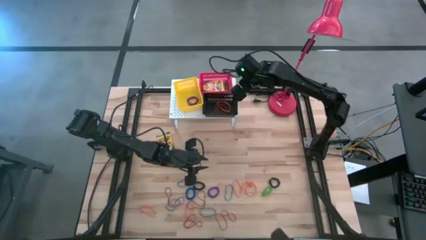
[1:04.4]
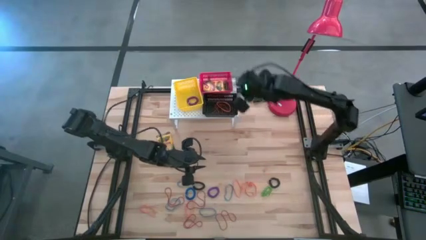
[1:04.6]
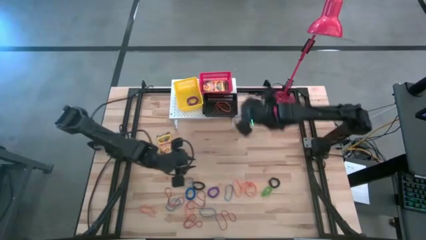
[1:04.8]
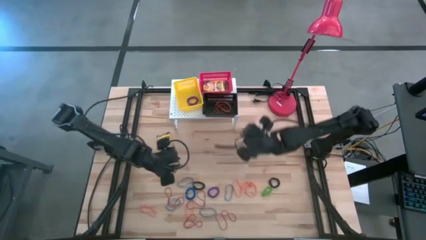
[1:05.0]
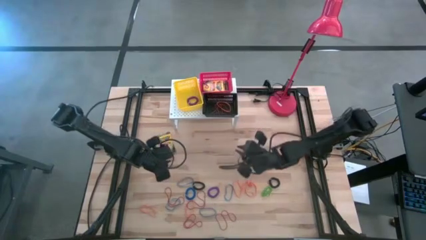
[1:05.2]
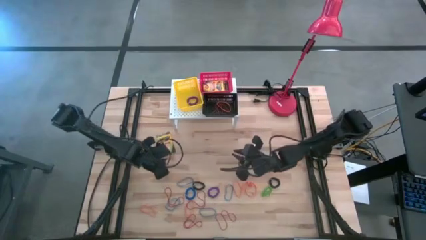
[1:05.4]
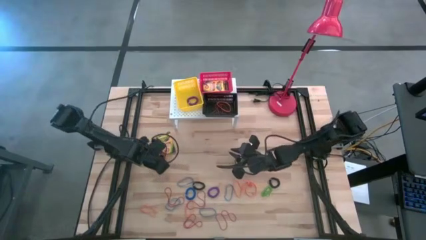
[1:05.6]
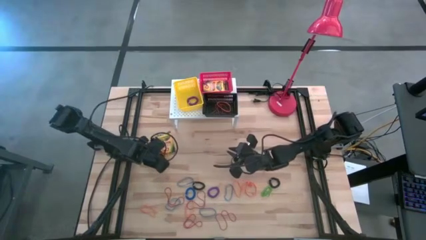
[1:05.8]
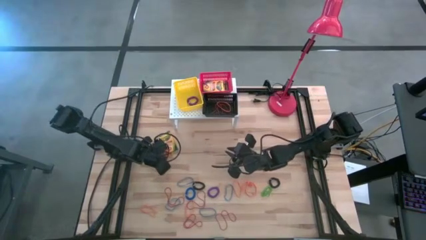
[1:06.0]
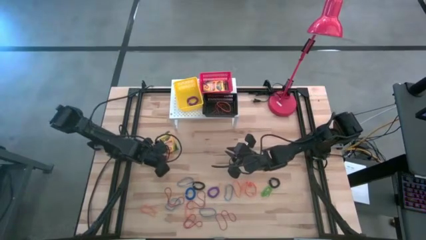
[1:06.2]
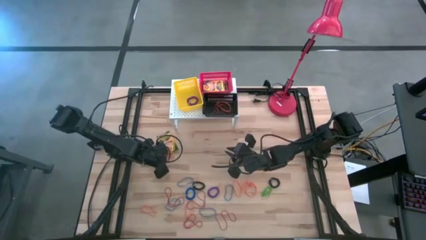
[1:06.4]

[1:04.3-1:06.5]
Task: Pick & Place Office Desk Supplies
Put the orange rubber band into the black bin on the shelf

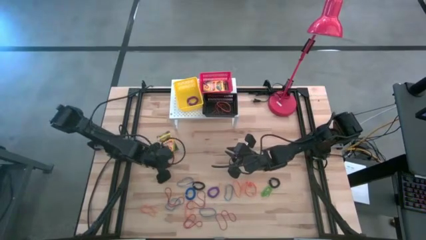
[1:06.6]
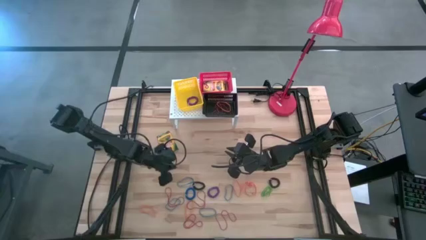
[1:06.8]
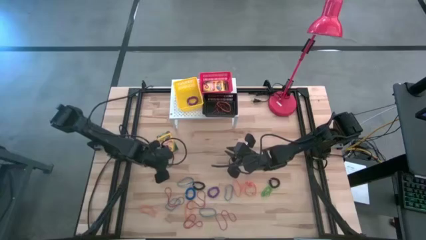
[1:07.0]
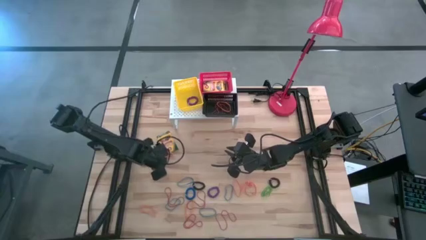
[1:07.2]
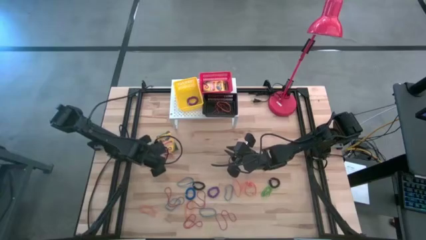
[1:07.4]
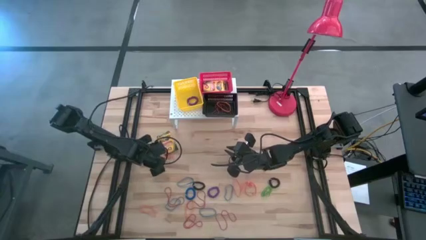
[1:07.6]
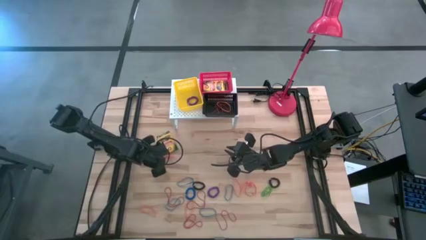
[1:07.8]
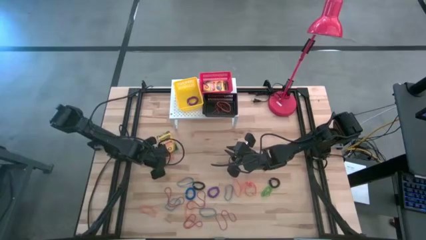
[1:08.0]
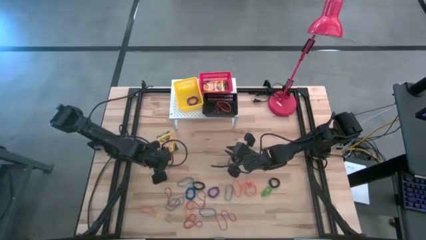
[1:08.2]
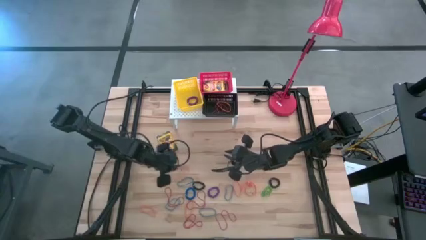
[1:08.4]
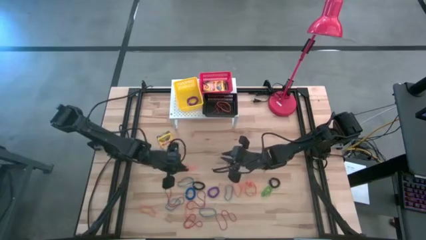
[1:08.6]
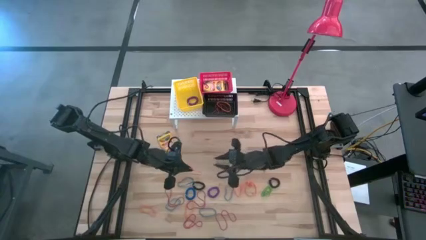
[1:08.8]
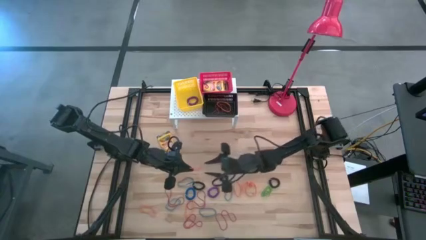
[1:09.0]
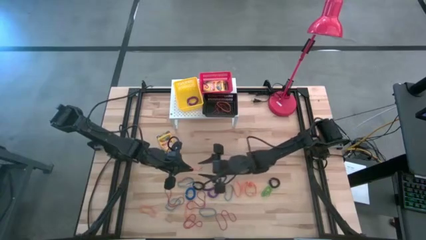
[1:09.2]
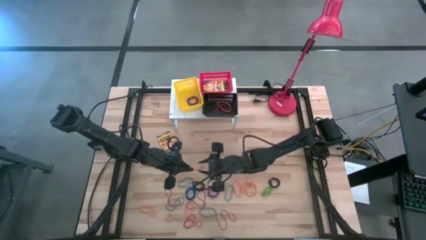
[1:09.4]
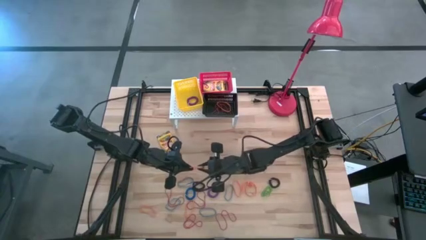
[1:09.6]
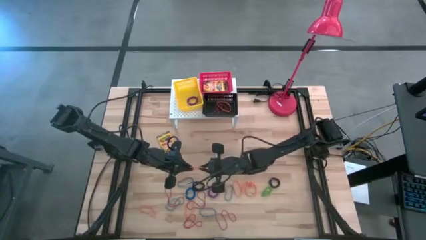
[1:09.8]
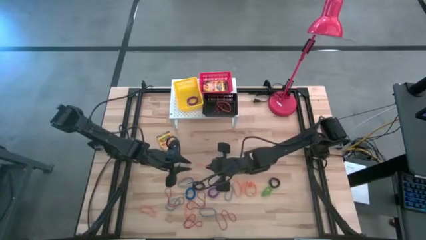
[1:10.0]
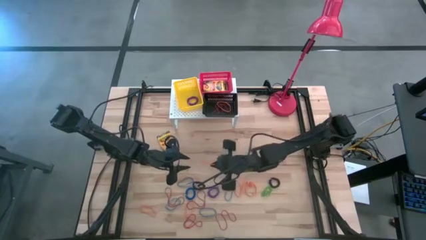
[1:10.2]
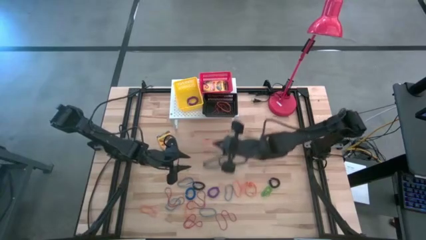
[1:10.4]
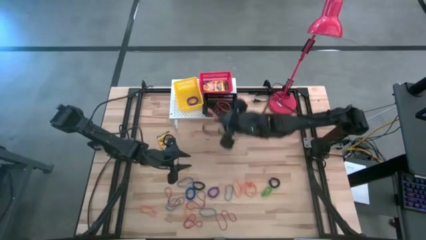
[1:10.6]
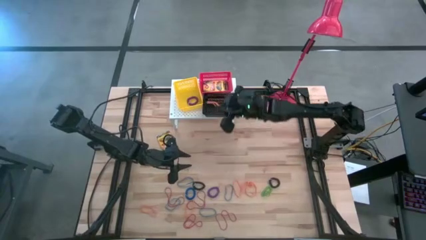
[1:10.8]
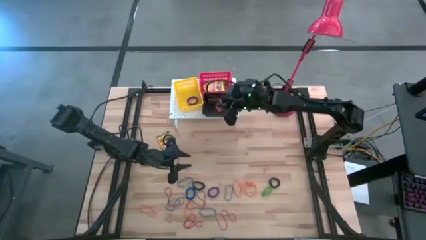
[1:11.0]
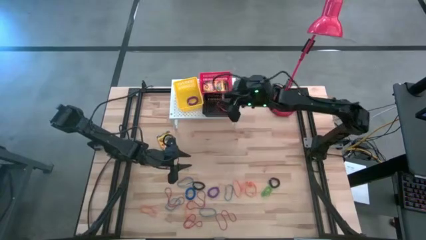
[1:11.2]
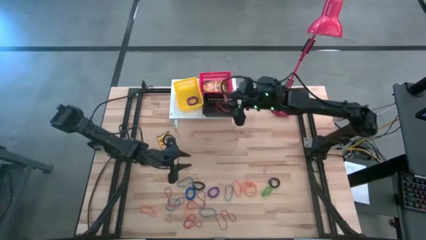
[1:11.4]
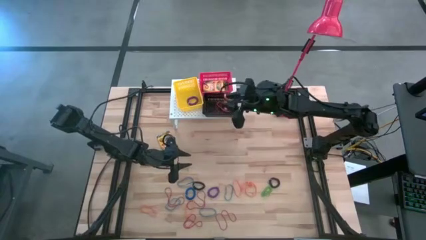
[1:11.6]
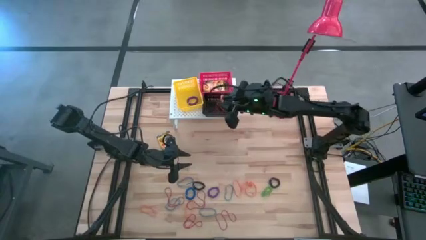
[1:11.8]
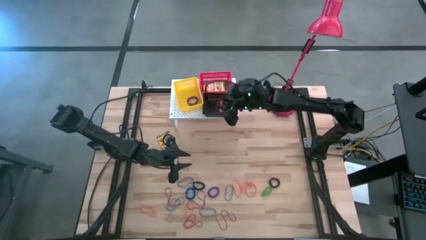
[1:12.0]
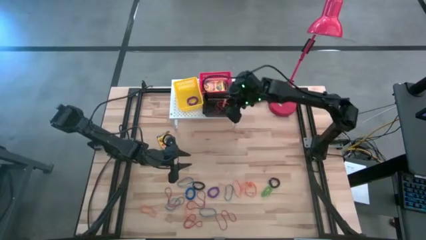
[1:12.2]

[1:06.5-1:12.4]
Put the orange rubber band into the black bin on the shelf

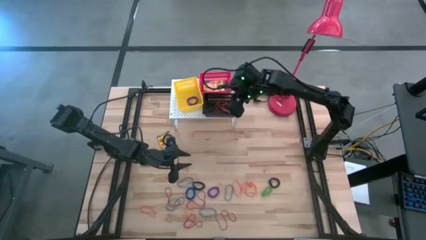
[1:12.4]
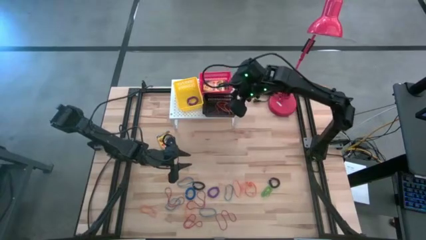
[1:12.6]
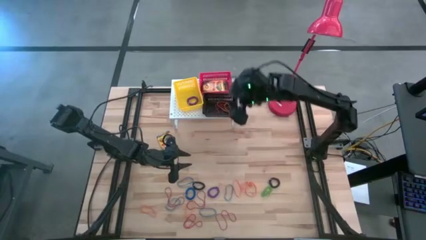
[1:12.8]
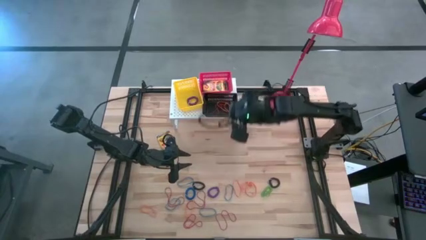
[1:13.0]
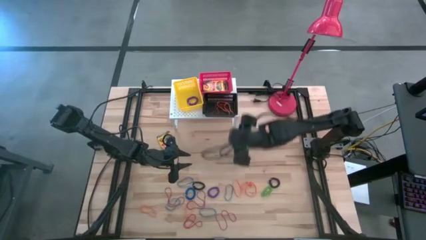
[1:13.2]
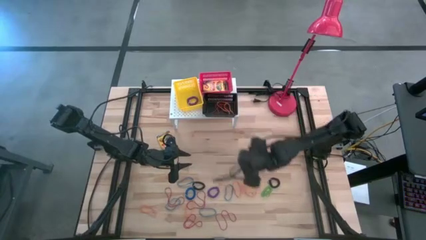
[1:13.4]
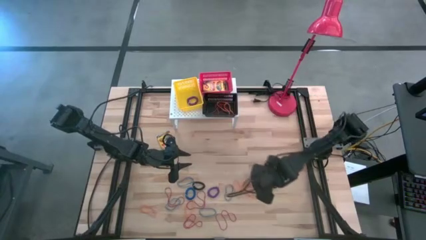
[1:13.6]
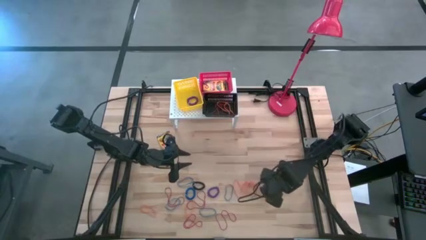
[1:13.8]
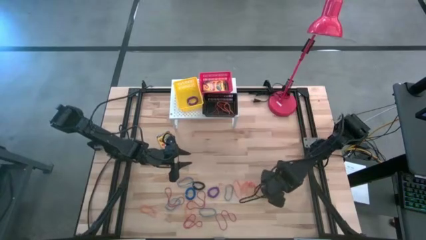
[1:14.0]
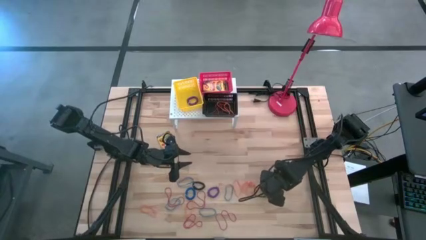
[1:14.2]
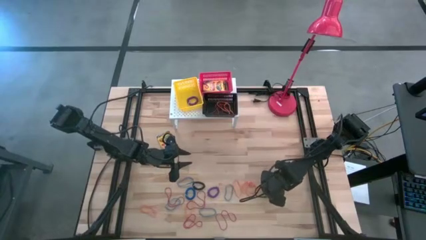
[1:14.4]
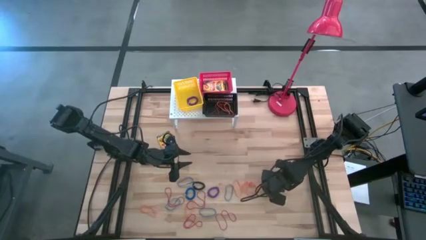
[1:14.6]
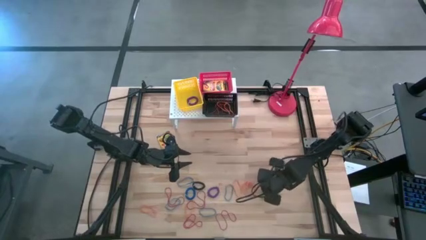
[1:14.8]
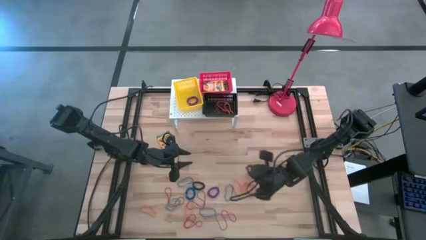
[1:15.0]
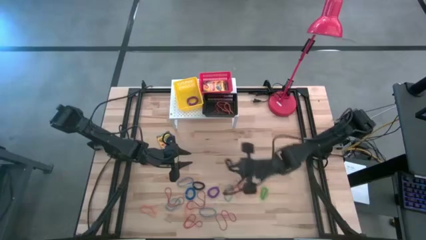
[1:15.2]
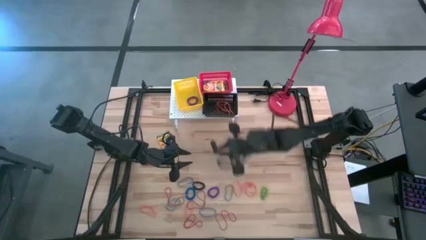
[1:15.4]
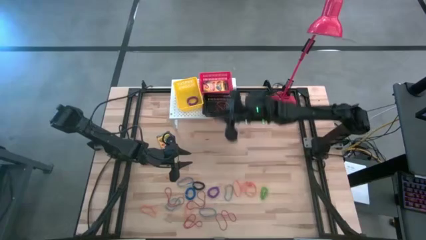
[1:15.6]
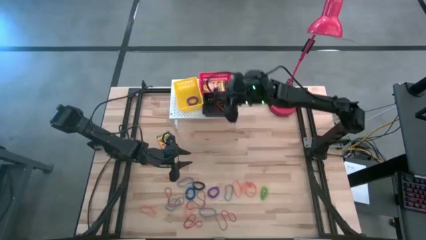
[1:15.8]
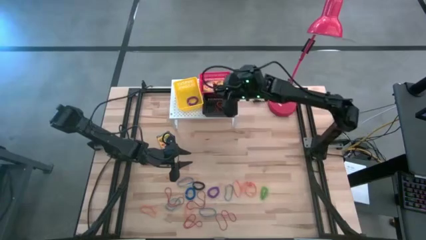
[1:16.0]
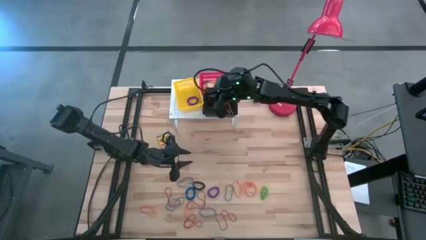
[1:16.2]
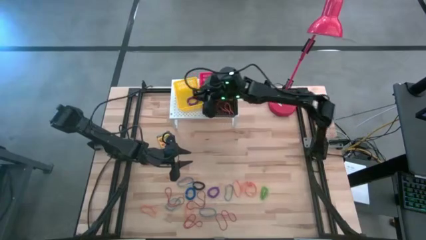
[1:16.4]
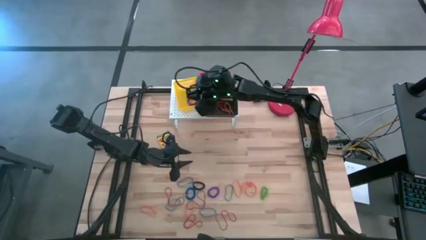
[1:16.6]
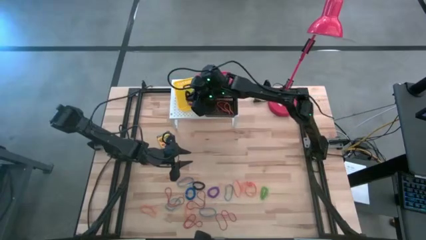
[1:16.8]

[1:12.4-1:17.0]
Put the black spring keychain into the yellow bin on the shelf

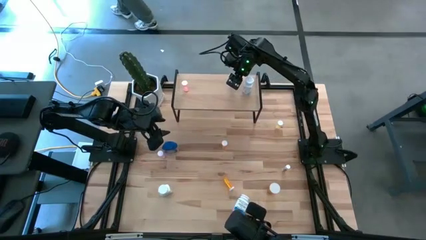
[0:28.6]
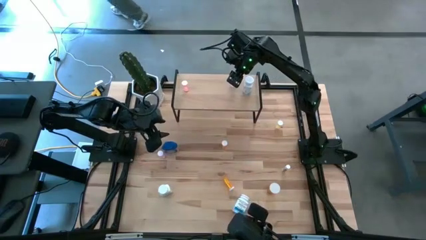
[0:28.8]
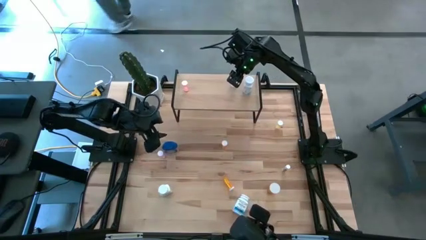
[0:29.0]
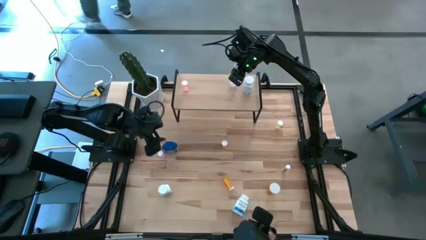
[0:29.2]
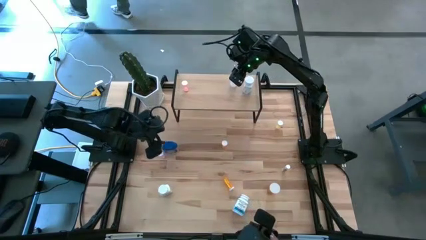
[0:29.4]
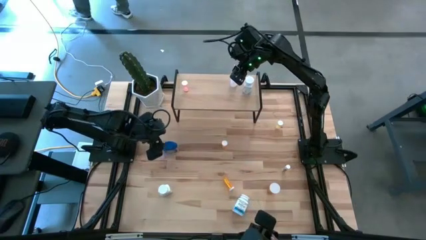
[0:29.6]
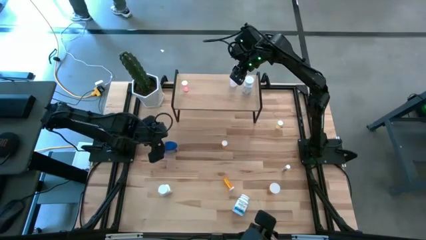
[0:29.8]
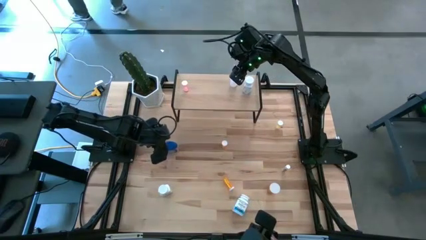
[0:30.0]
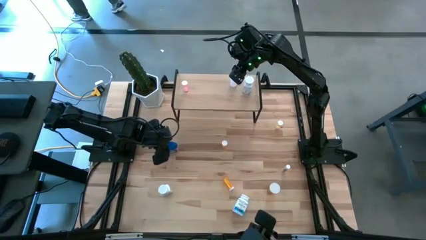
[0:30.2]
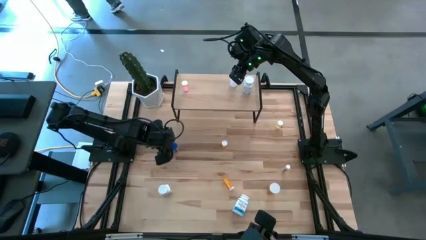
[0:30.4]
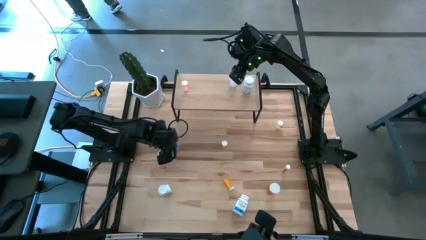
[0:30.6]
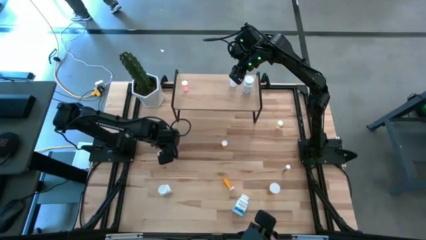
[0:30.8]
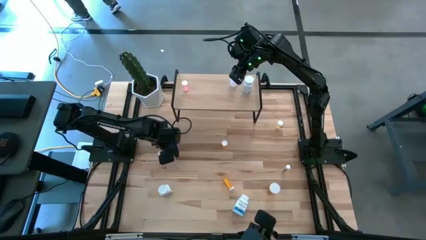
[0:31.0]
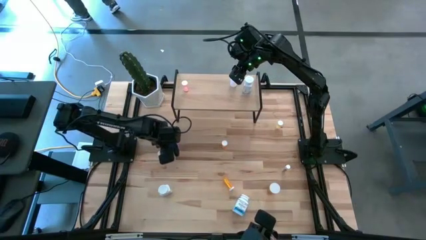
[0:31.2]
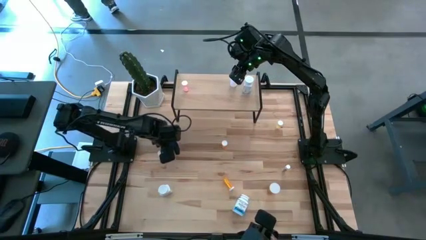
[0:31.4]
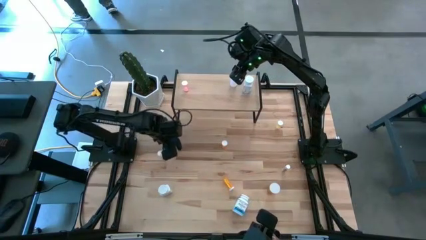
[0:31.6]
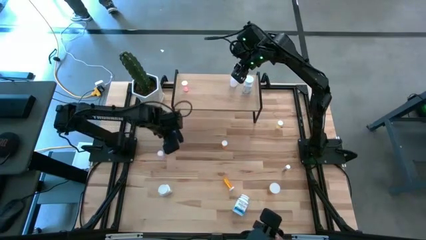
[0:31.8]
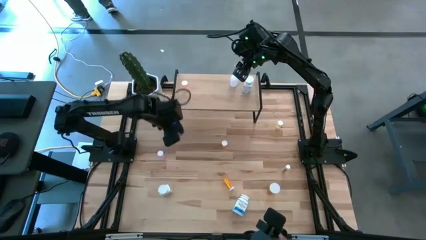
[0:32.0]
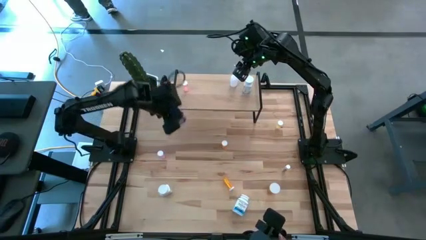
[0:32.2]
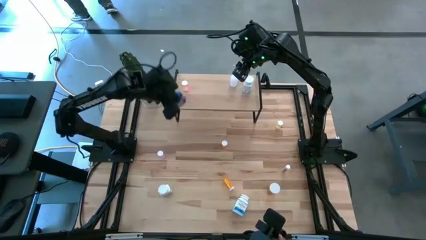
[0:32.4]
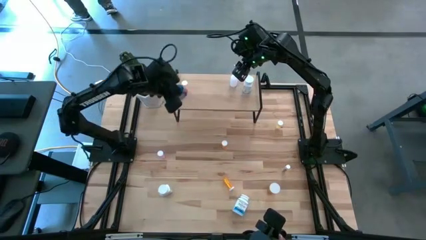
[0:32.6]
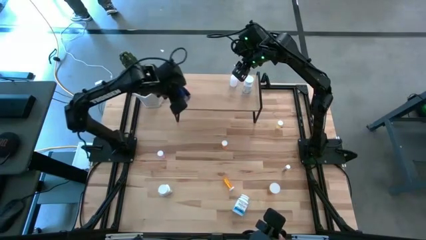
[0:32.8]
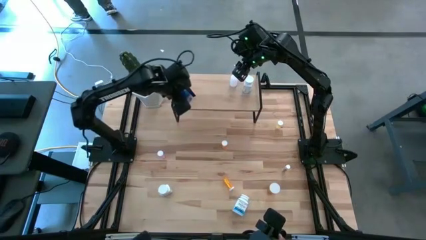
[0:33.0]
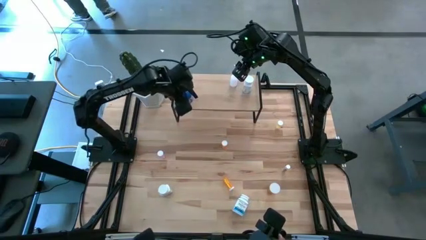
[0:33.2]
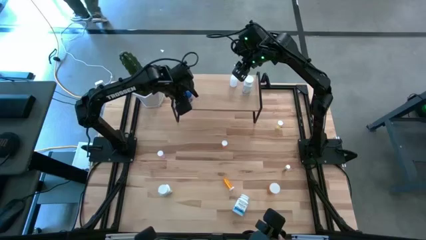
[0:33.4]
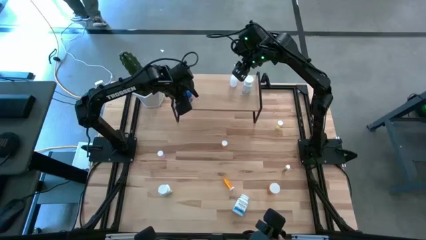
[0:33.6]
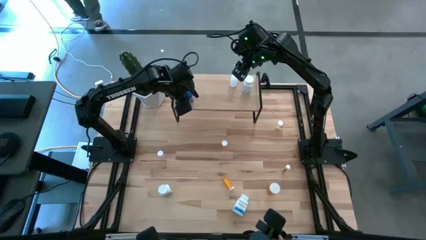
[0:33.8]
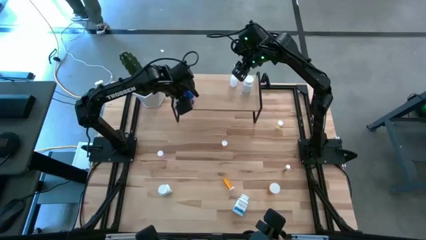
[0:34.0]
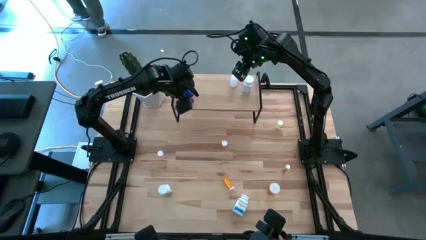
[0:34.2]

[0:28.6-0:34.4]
Task: Pick and place medicine bottles onto shelf by color
Put the blue gummy pill bottle on the shelf
